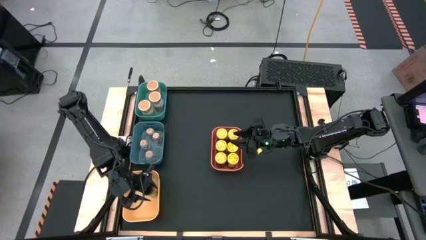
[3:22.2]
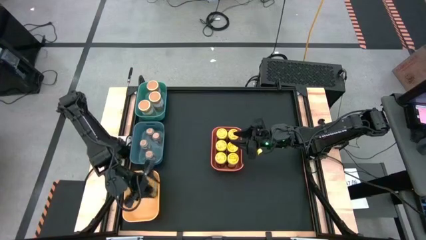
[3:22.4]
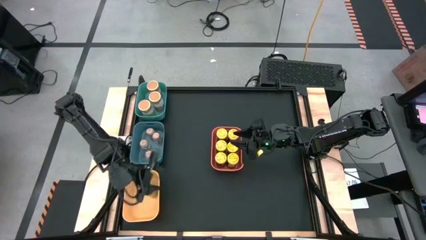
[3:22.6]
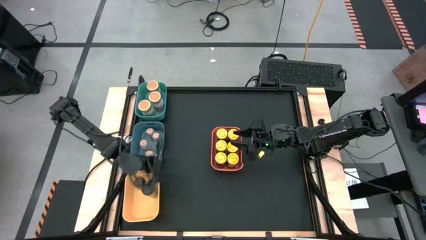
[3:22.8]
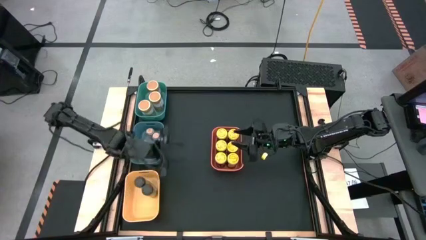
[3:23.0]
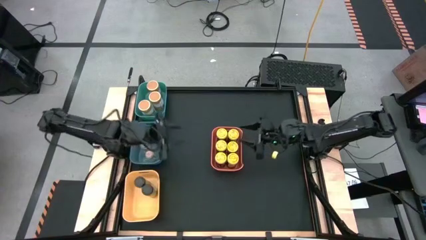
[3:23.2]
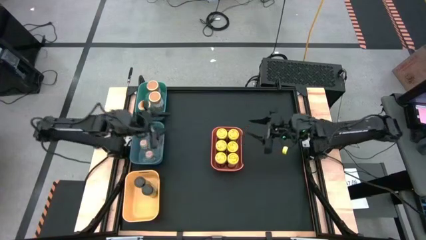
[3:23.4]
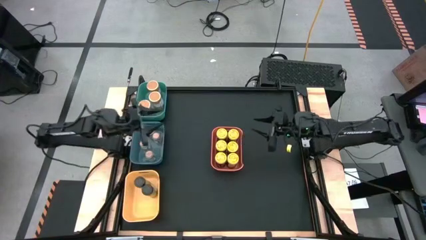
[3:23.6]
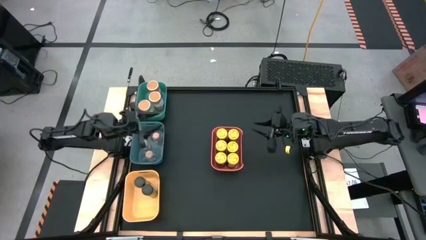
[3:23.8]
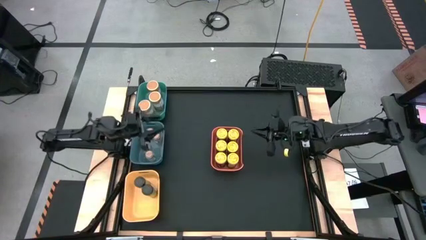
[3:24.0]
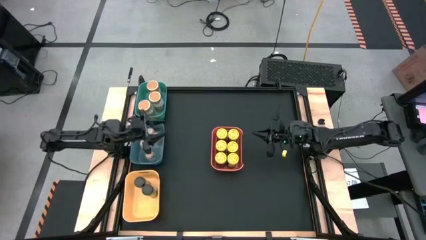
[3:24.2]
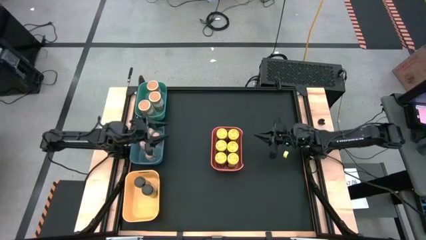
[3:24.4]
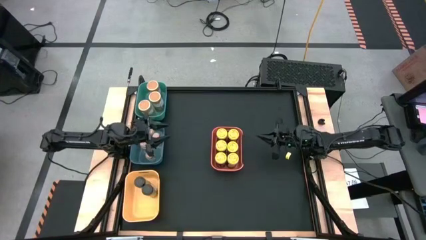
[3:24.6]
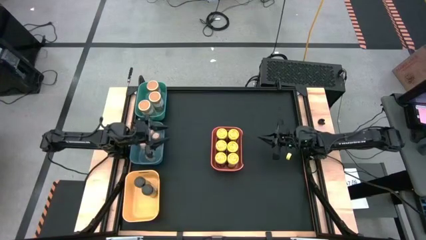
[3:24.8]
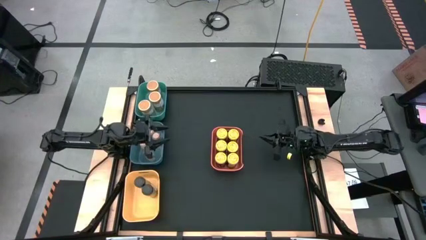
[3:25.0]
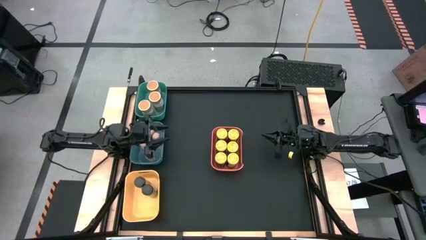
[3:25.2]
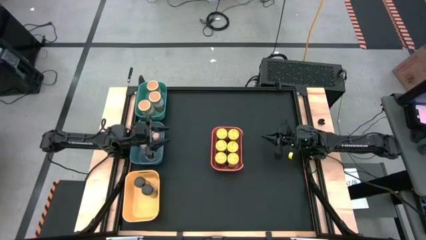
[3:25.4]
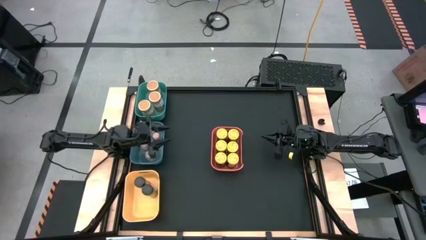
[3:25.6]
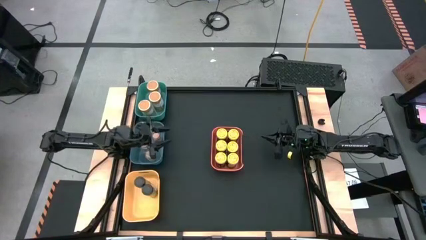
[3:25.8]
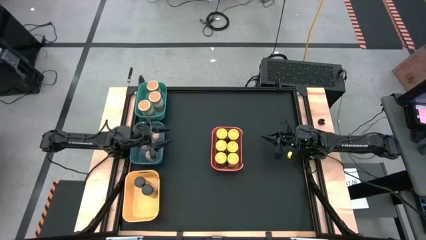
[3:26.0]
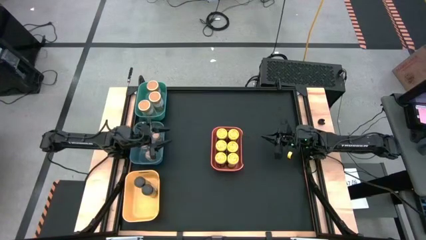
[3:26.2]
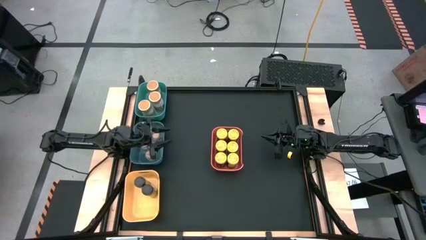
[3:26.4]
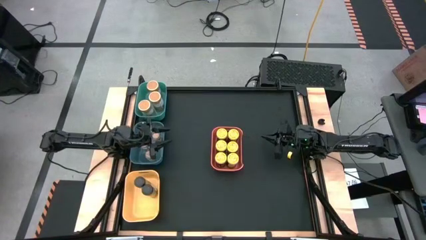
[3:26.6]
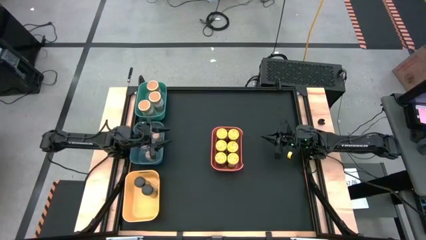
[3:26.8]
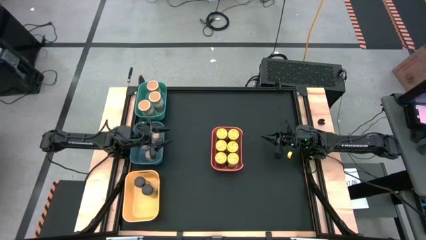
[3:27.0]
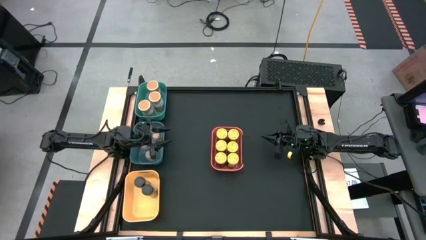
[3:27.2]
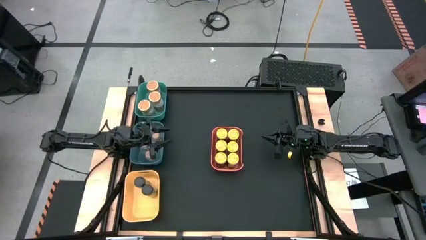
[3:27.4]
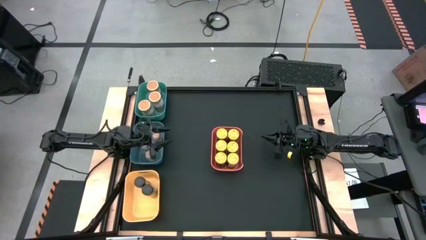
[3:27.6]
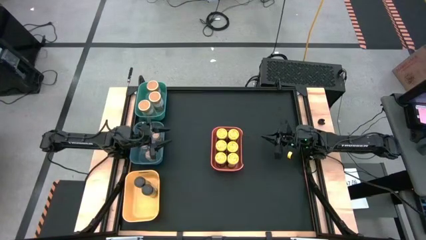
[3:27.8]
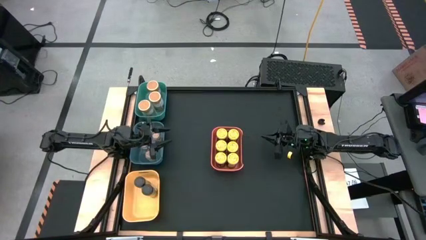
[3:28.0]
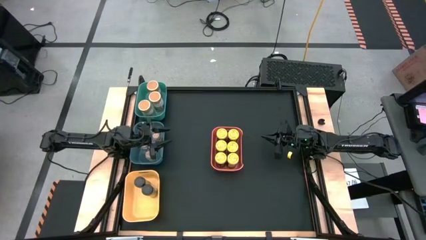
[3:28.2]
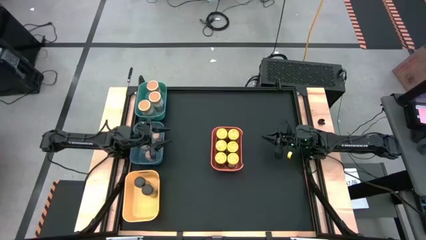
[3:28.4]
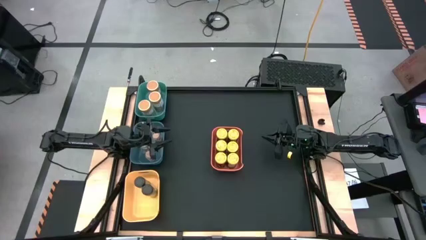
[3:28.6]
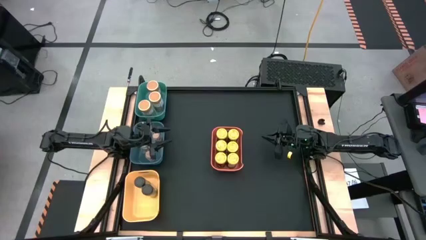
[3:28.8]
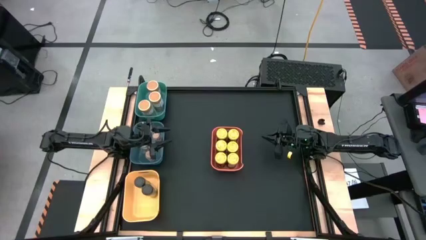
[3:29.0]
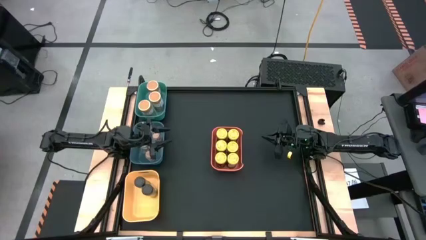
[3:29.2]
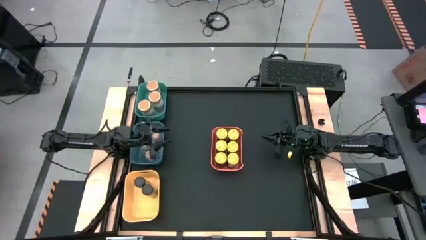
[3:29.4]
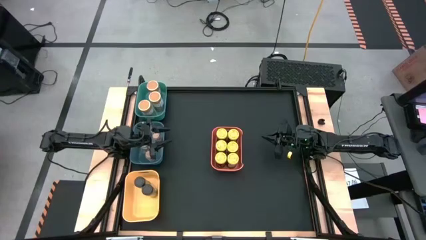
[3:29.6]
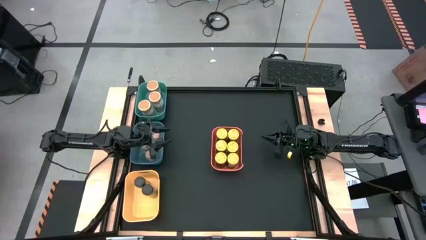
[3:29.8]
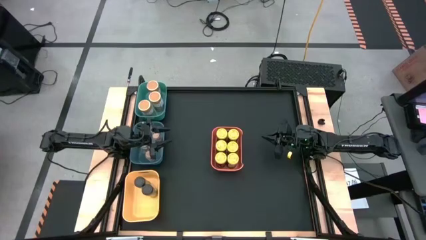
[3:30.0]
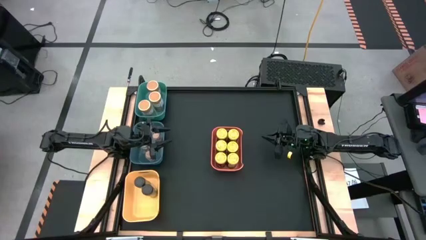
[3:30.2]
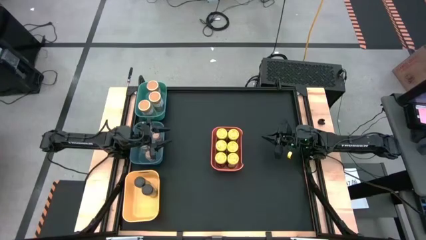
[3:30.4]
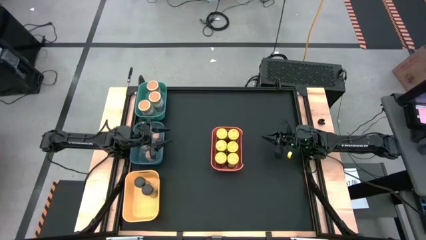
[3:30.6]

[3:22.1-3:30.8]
Task: Sort spices by type
Return to Home Position
